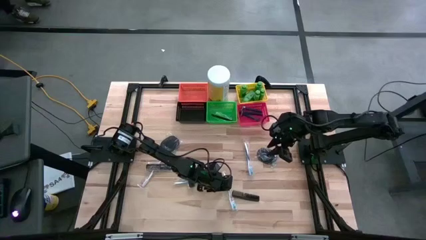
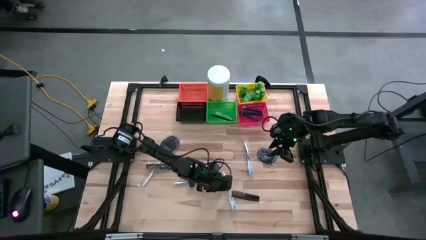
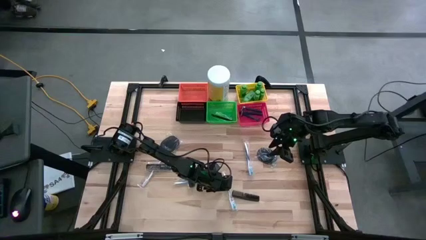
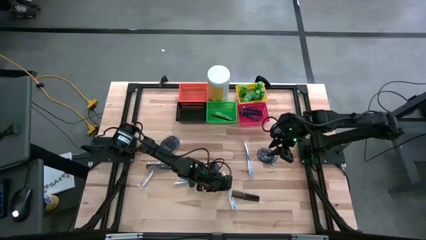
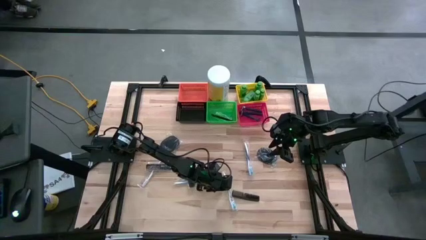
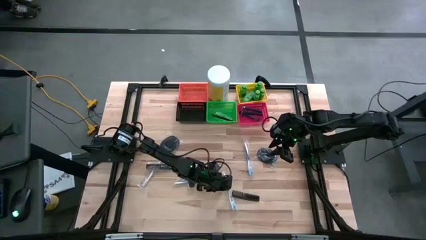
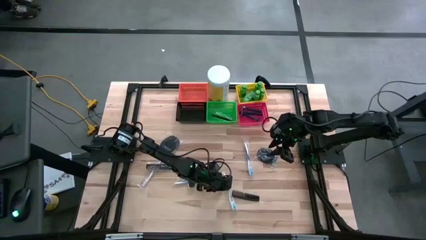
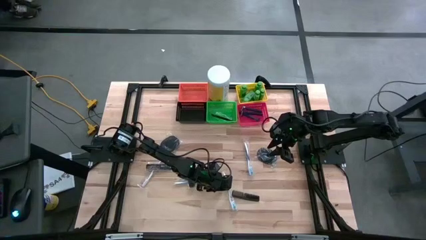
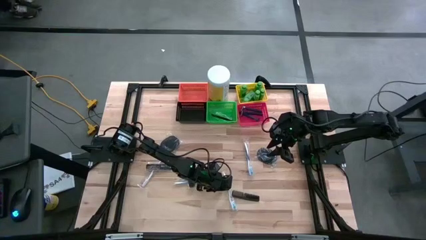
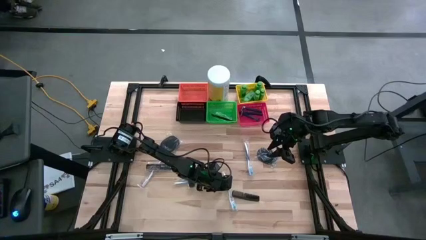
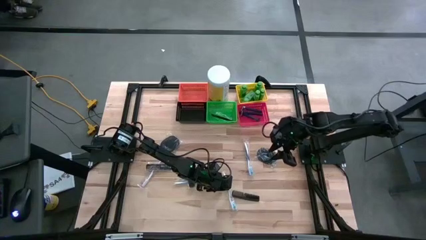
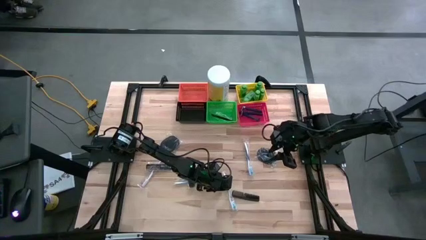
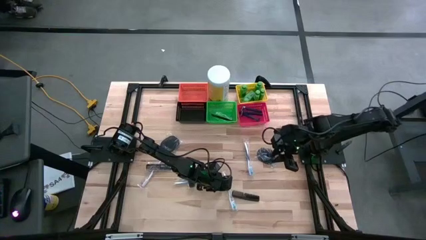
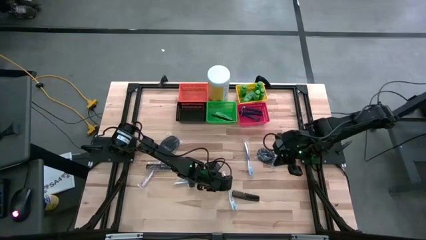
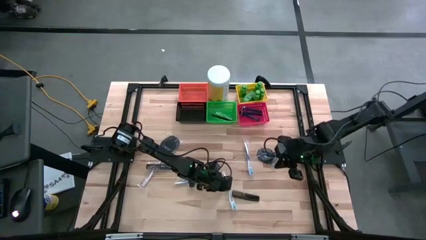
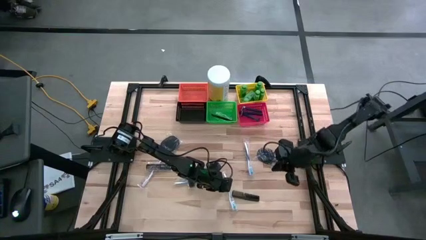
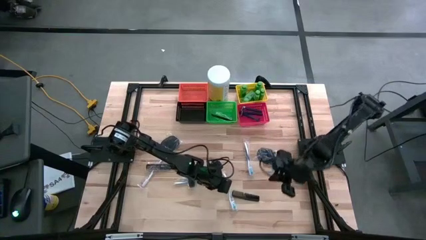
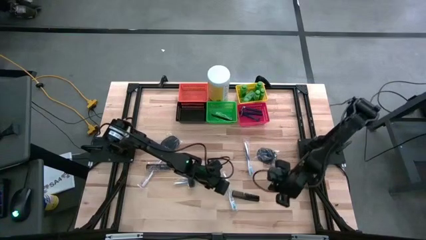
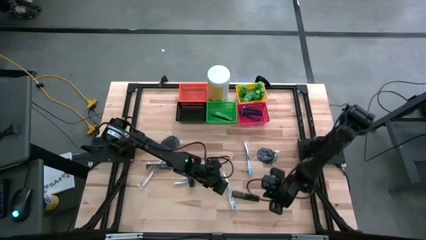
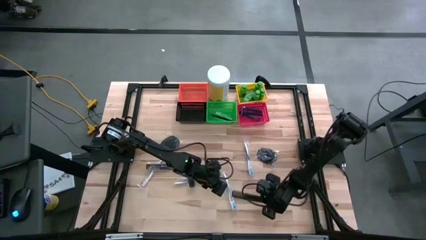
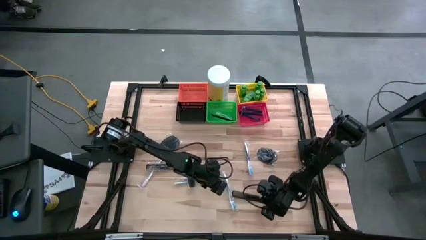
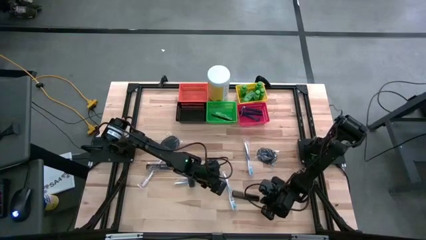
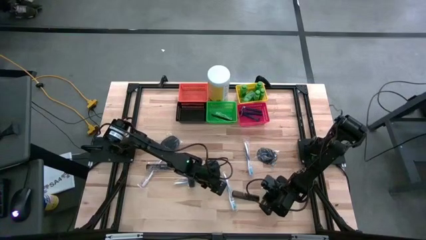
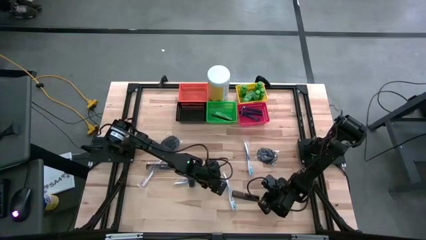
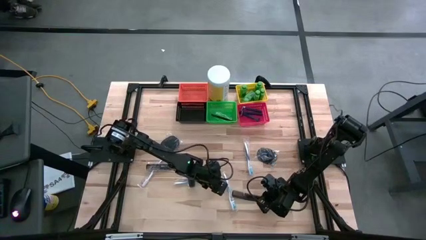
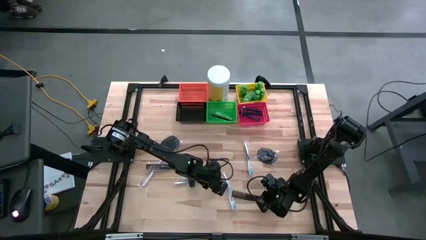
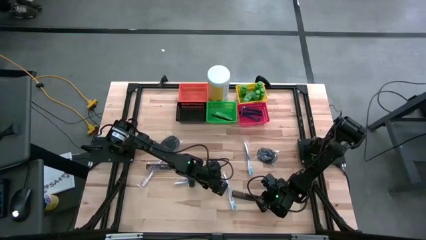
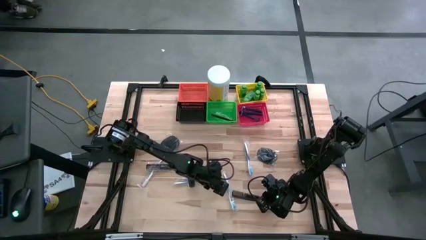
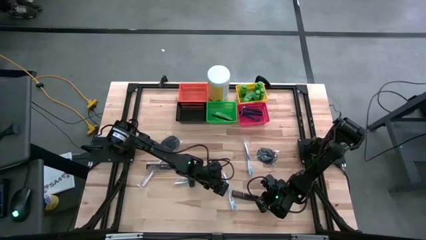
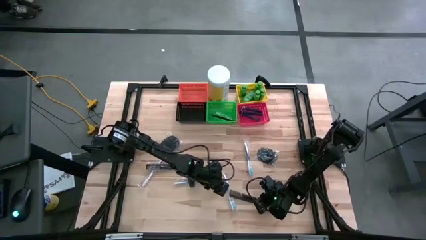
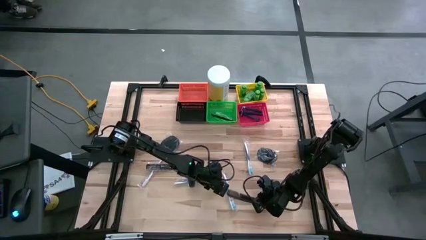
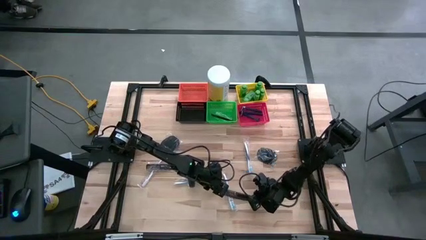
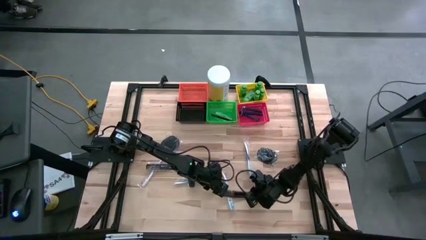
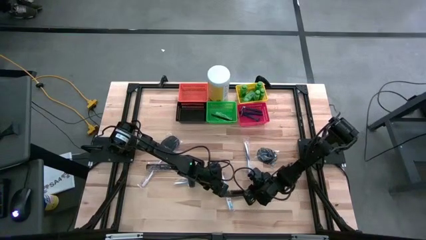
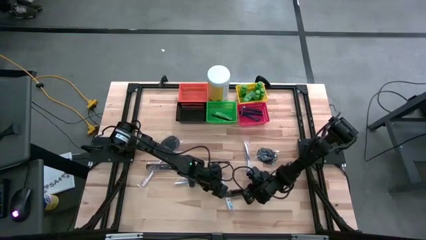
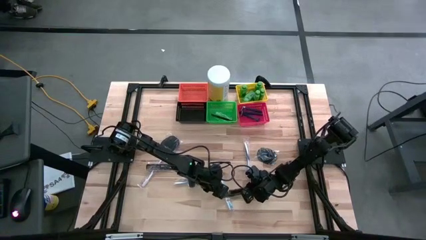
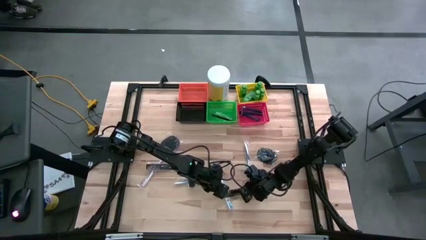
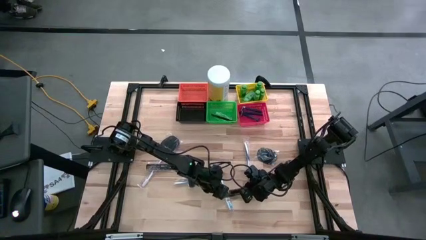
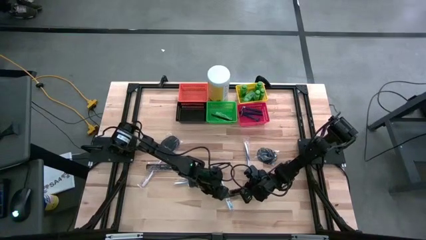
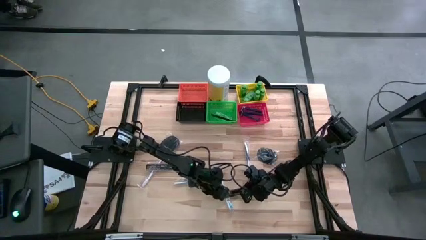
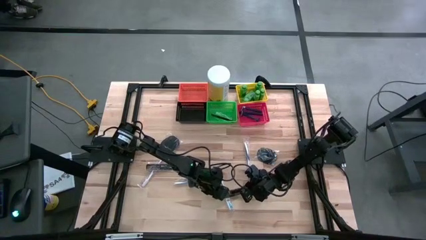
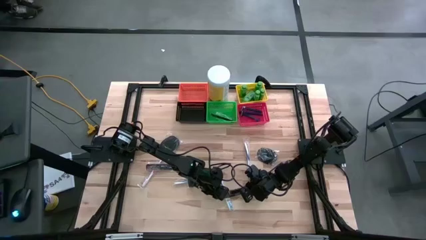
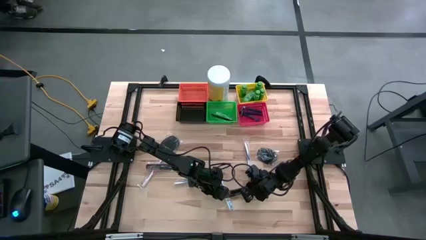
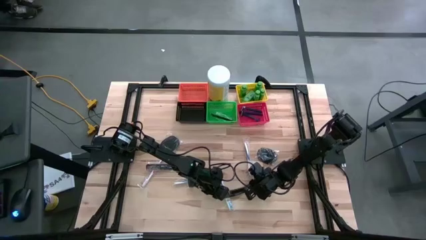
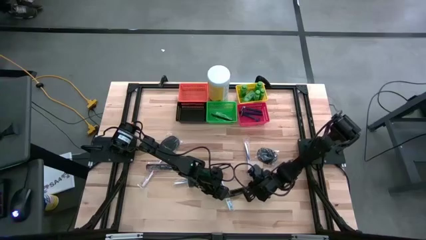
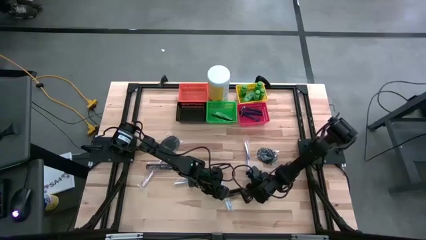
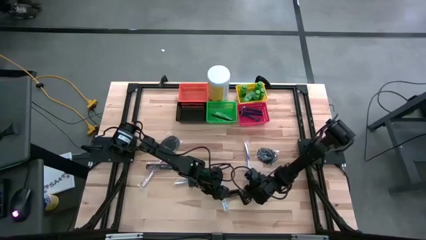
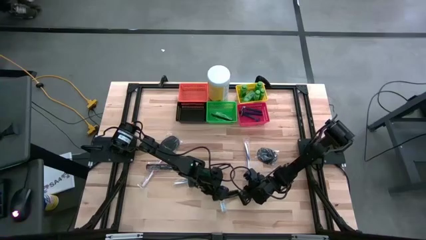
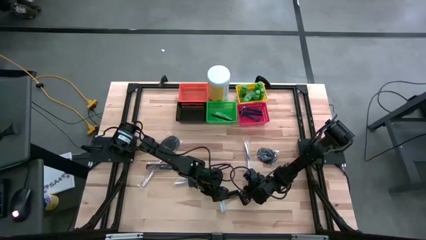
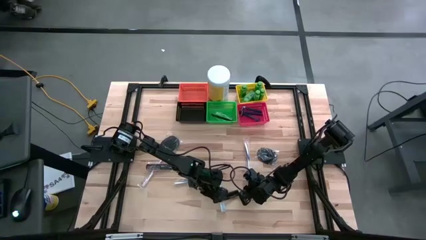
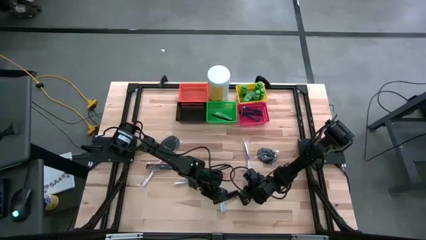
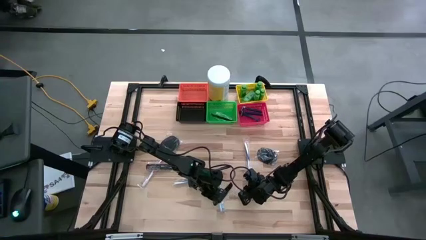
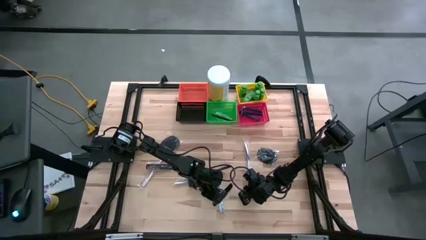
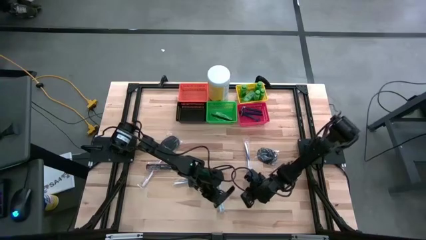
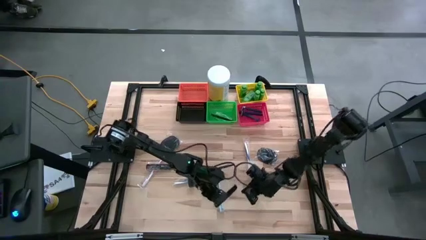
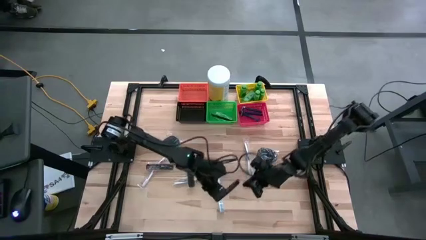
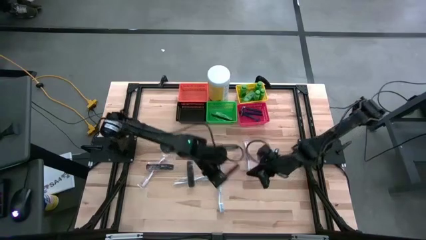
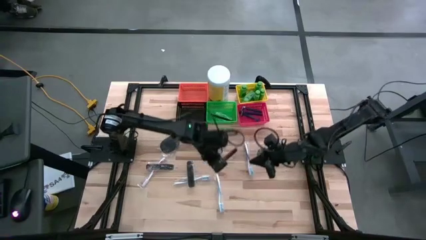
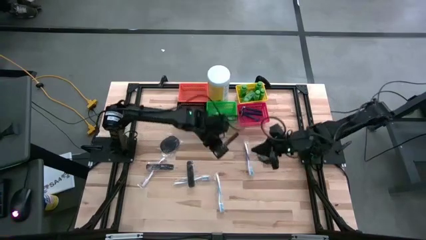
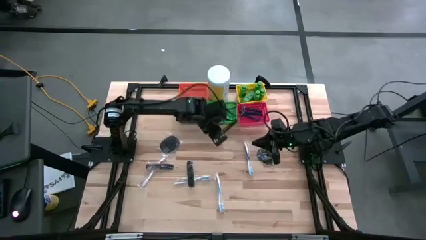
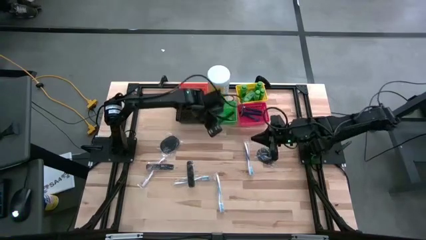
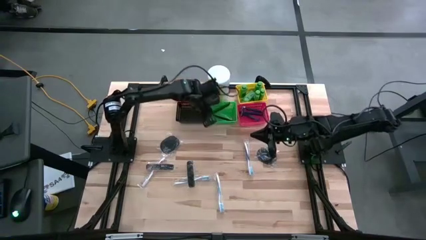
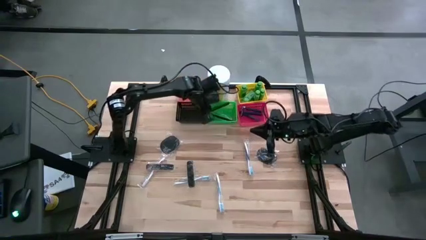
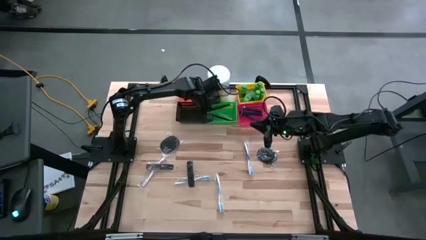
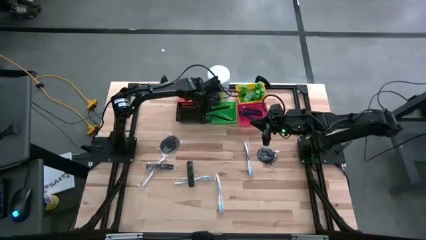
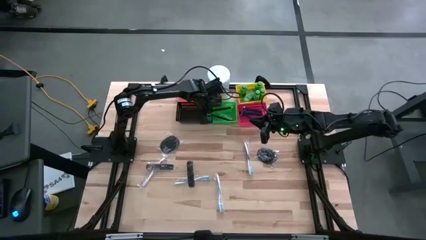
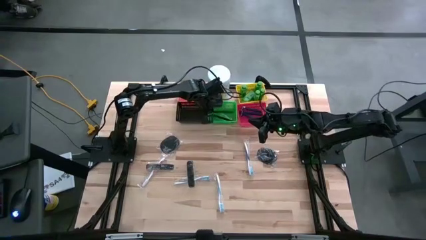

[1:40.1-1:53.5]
Task: Pick & Place Travel size toiletries
Put the black comb into the green bin
